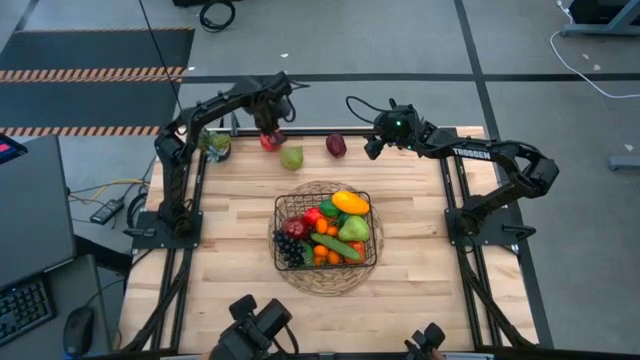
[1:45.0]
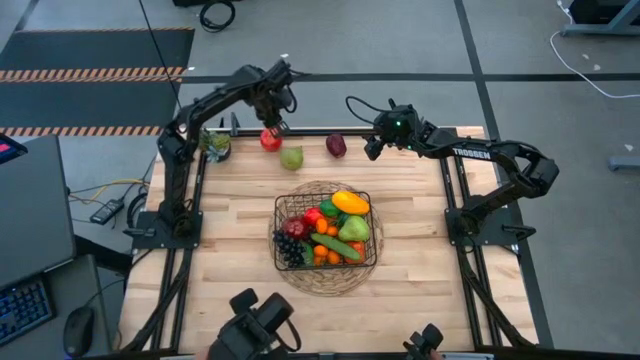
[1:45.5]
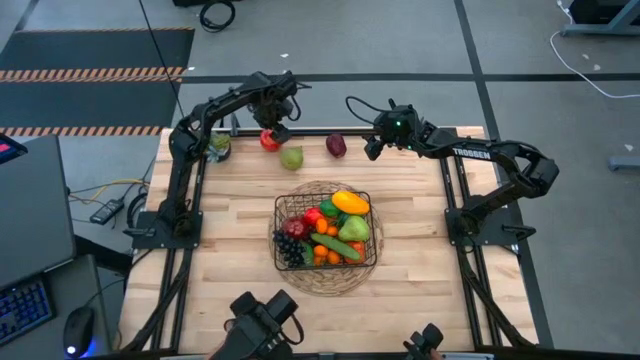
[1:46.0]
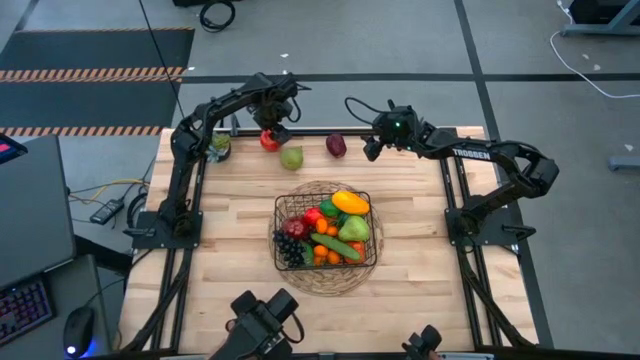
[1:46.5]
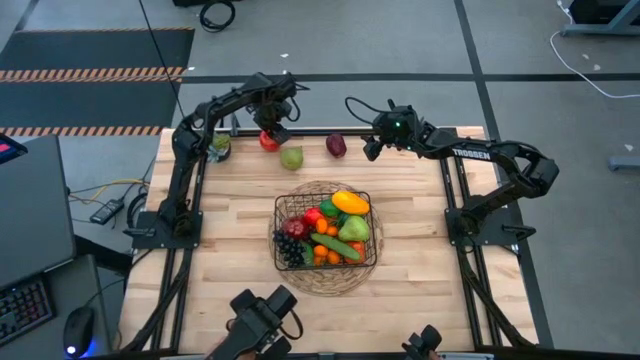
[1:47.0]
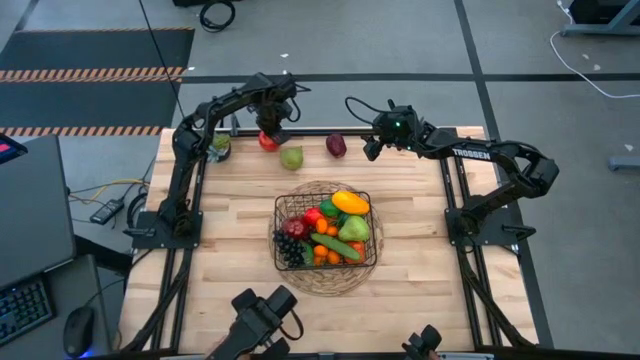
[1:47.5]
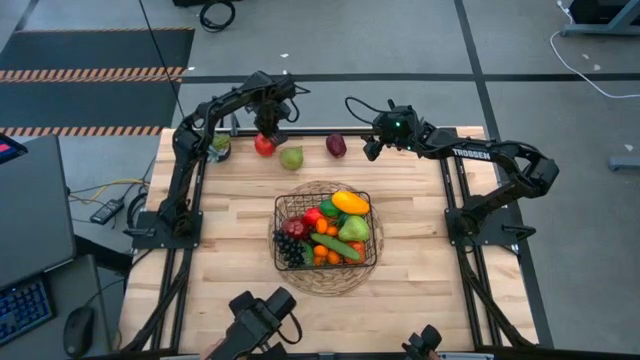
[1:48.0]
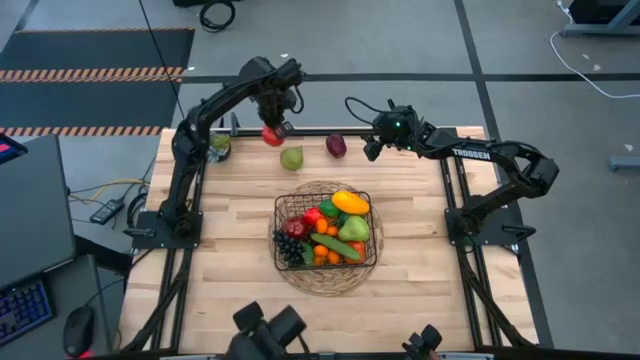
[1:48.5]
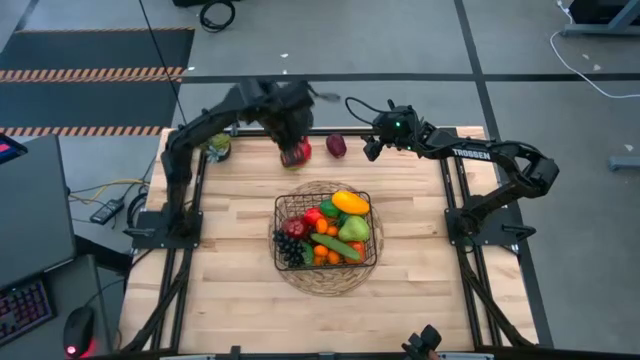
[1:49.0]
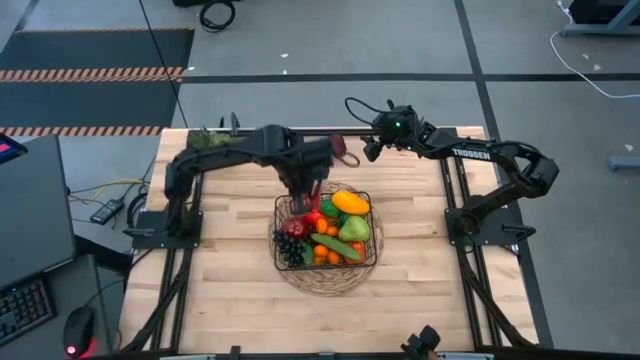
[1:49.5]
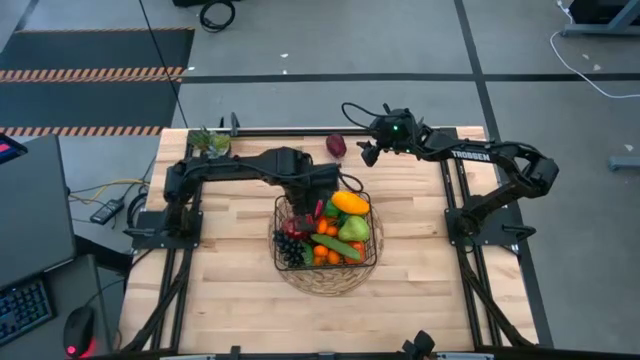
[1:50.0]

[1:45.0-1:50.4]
Task: Build produce basket
Put the red apple into the black wire basket

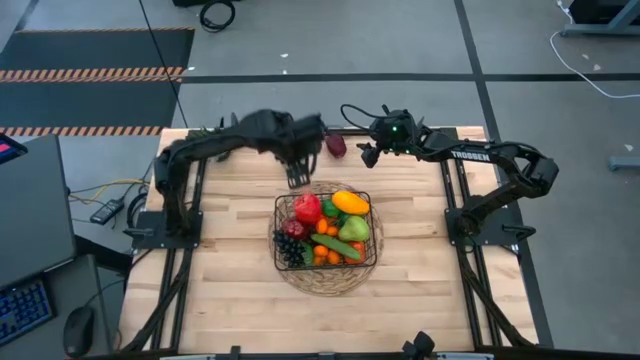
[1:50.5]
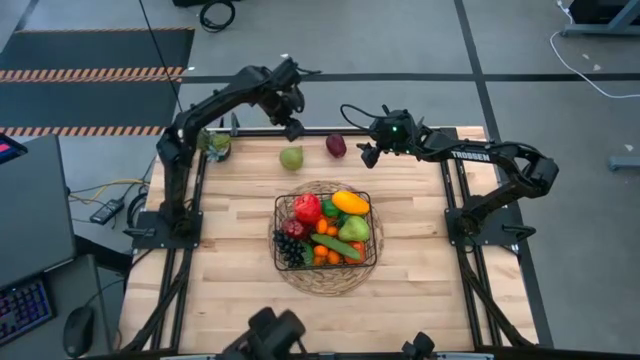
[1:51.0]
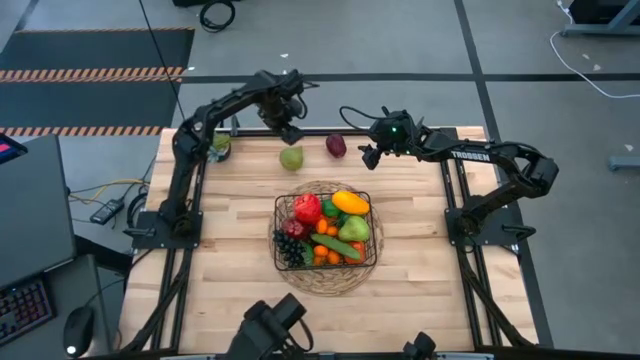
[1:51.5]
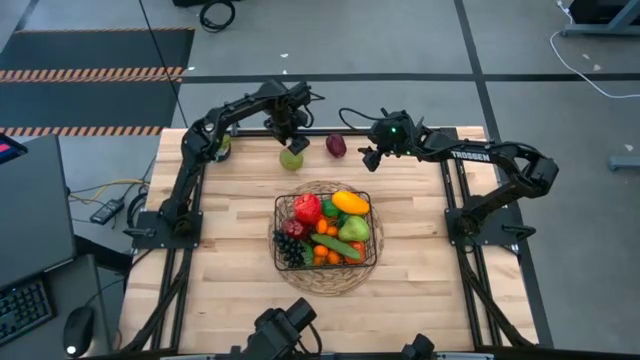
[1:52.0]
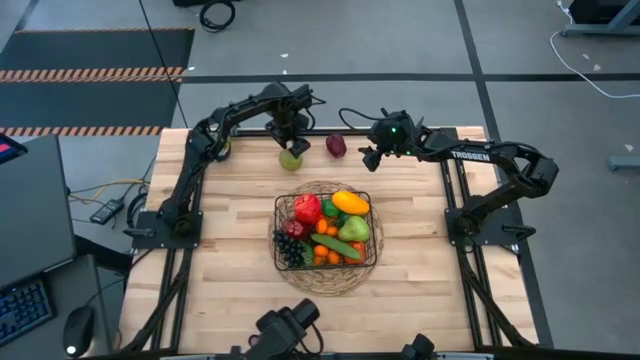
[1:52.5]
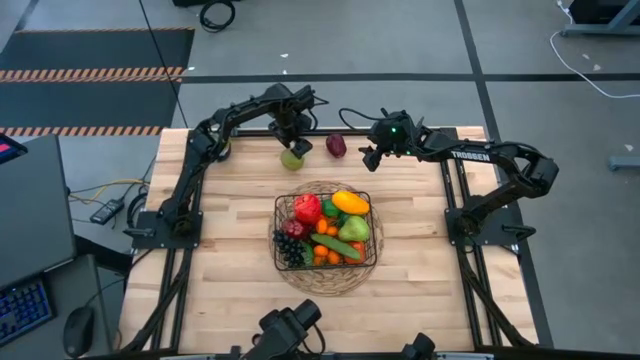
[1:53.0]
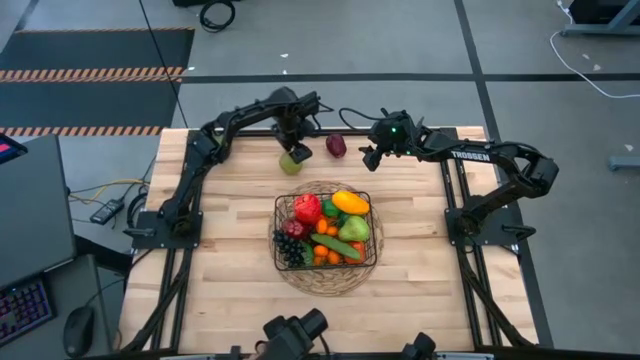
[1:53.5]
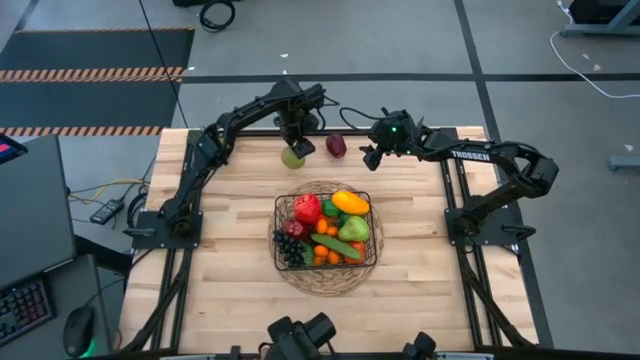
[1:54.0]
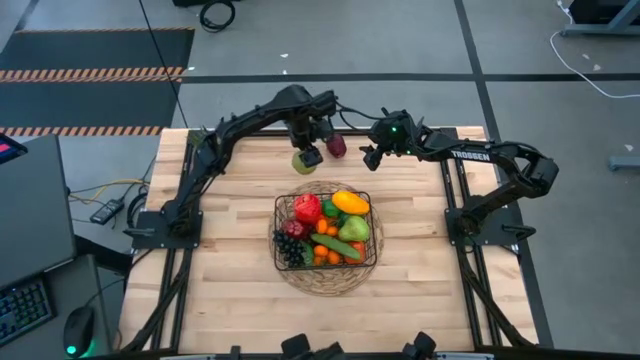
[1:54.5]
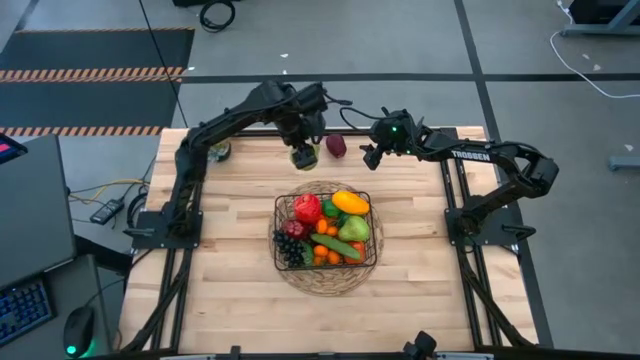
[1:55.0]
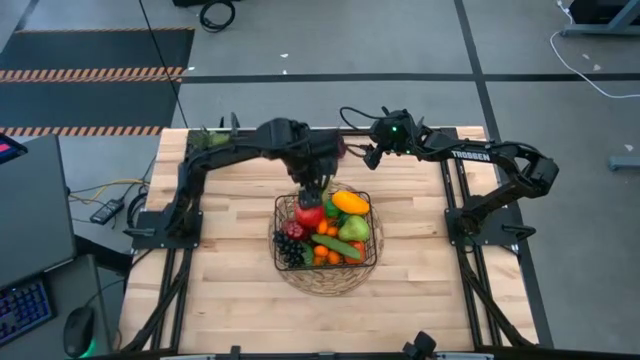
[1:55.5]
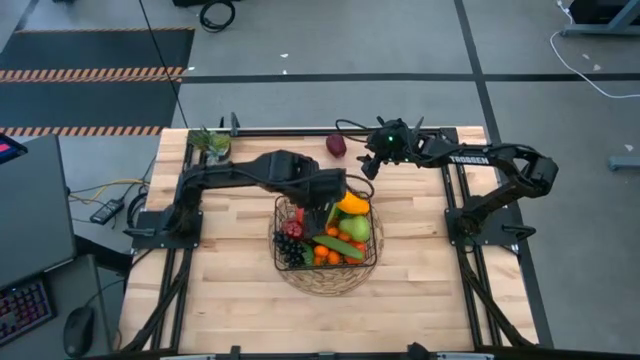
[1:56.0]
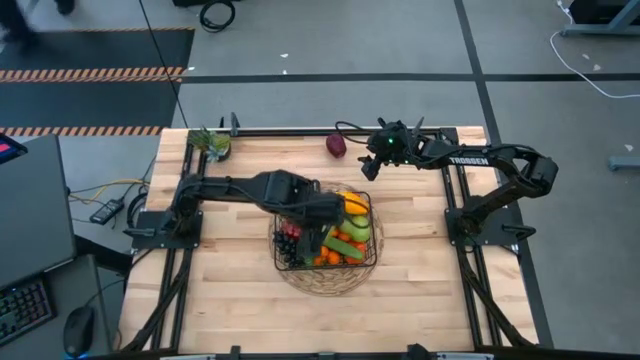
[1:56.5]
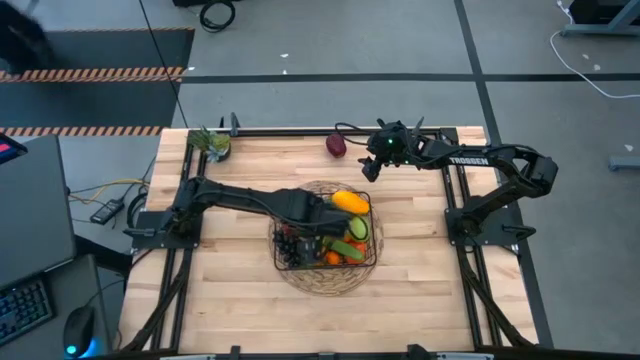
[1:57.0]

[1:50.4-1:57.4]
Put the green pear into the black wire basket

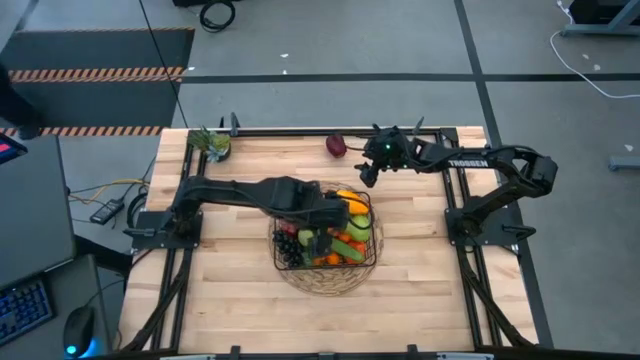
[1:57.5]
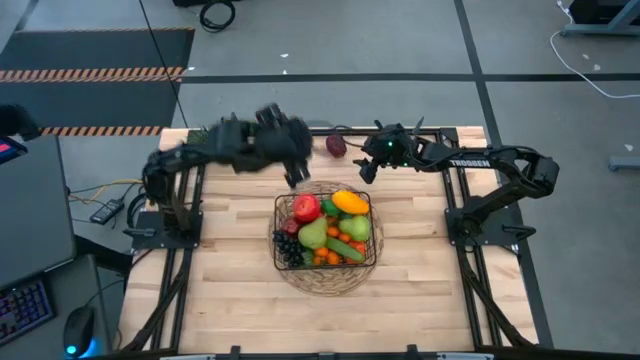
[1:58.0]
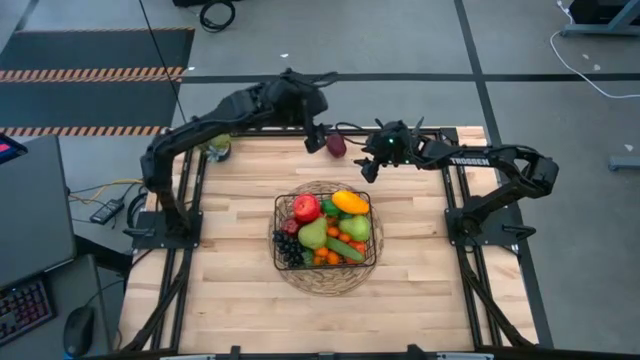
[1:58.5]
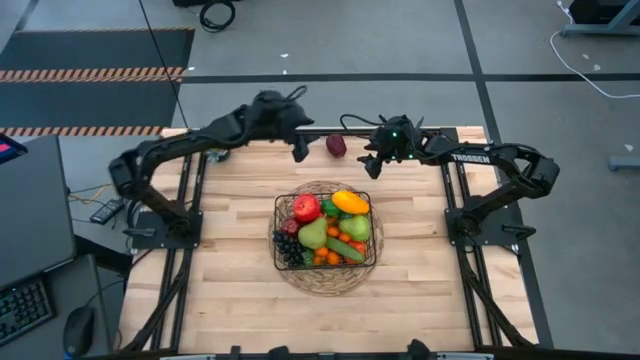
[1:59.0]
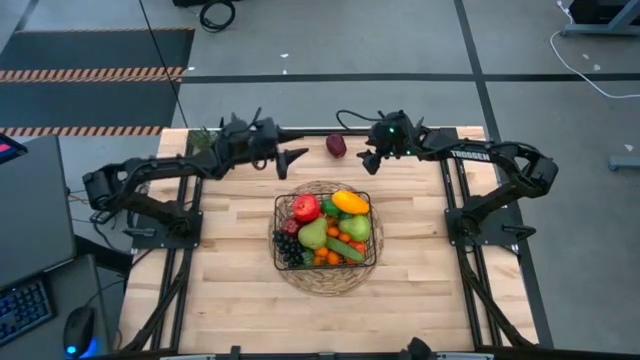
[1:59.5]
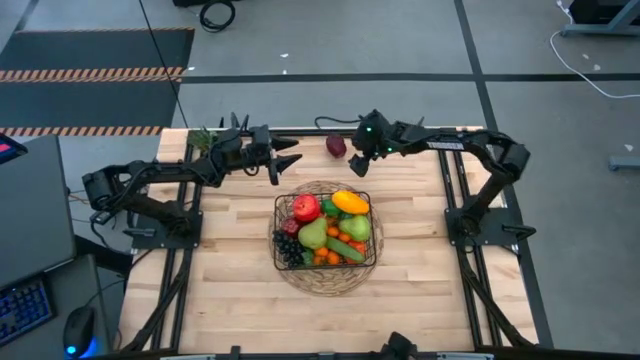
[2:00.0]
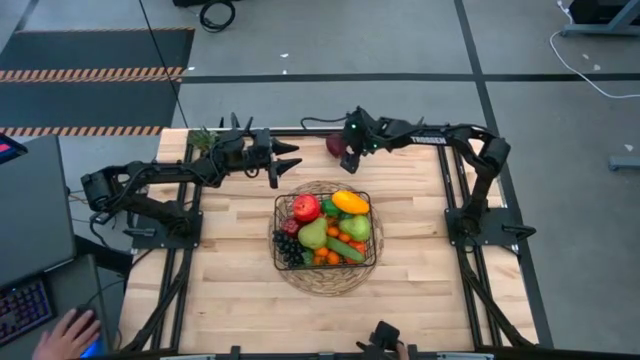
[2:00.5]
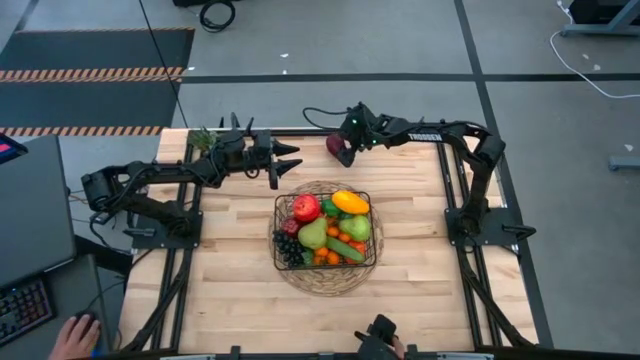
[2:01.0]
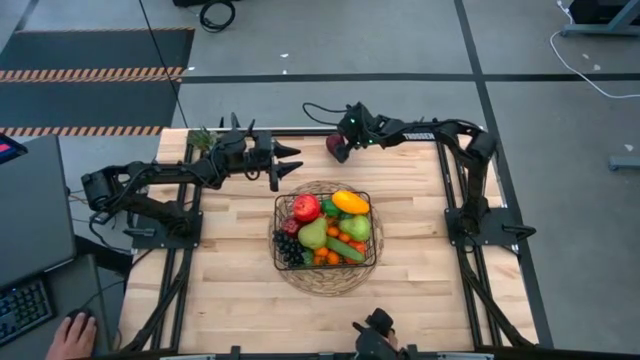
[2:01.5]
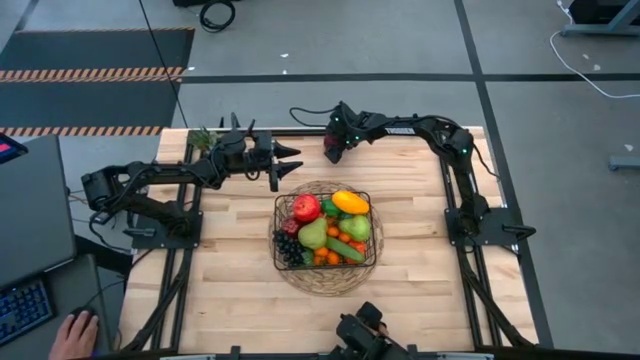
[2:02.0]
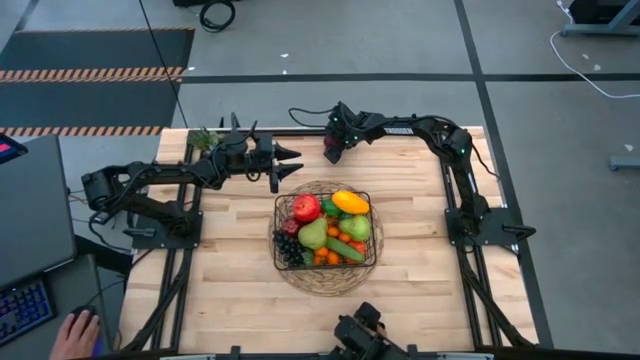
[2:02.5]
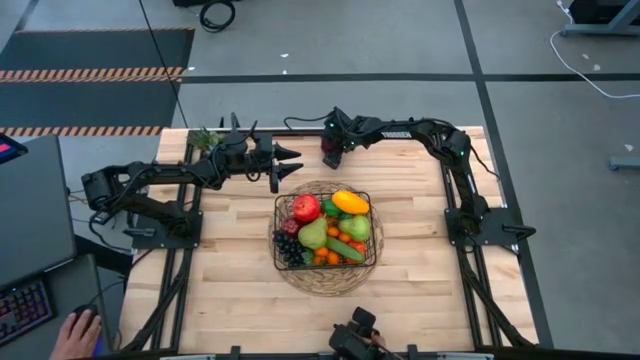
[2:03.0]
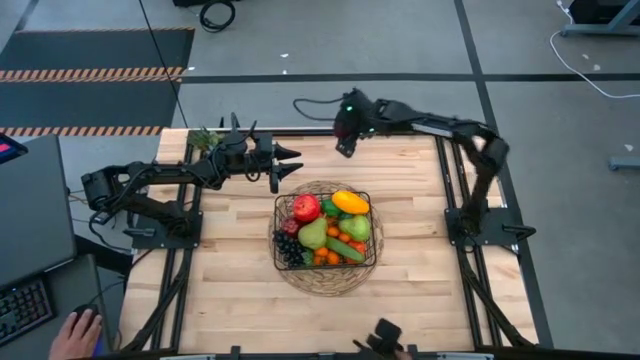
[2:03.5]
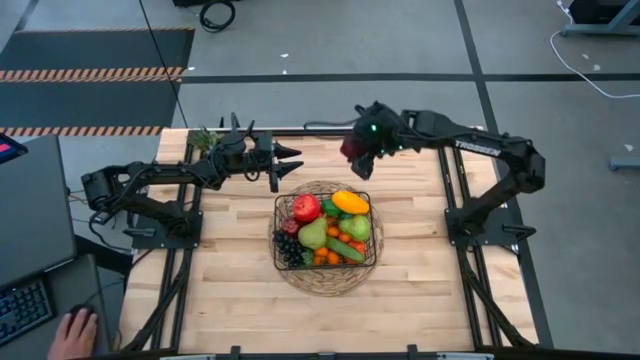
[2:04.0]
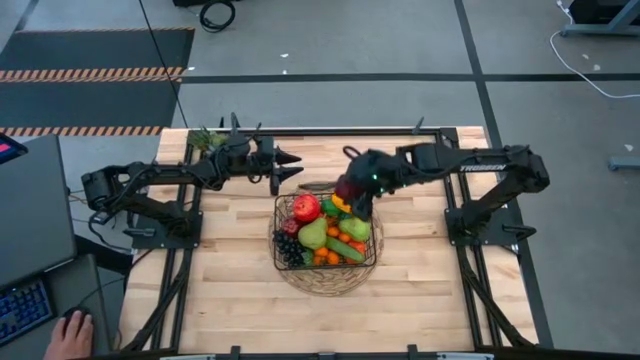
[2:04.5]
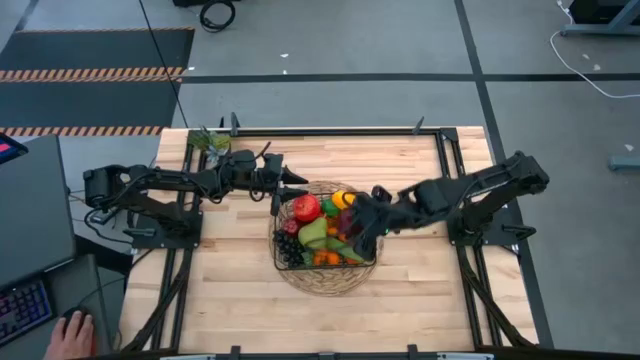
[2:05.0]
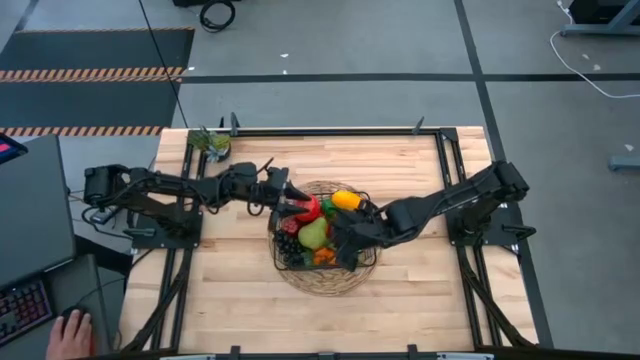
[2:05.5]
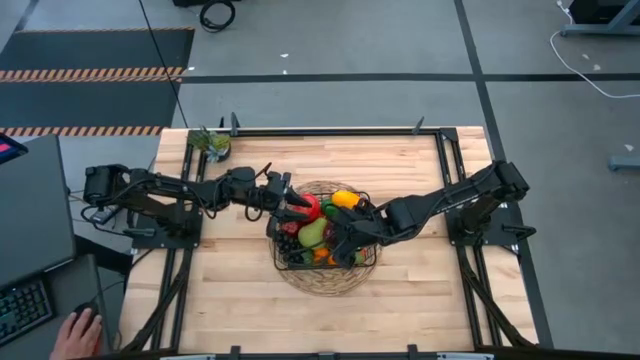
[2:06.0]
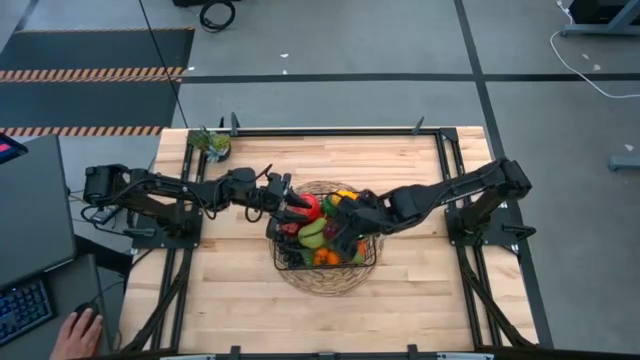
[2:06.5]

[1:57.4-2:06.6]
Put the dark red apple into the black wire basket
